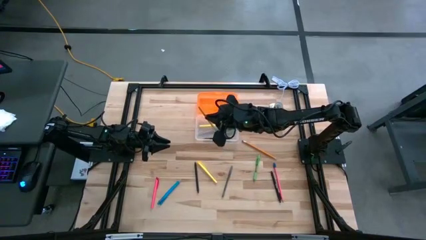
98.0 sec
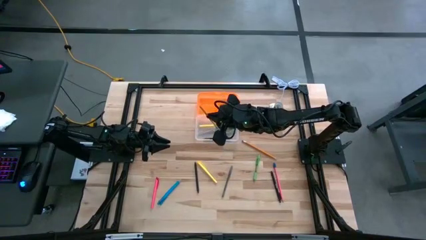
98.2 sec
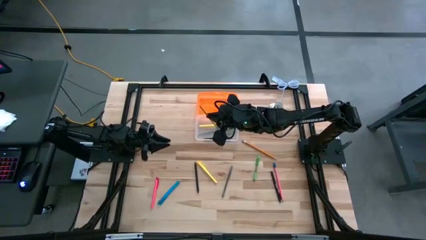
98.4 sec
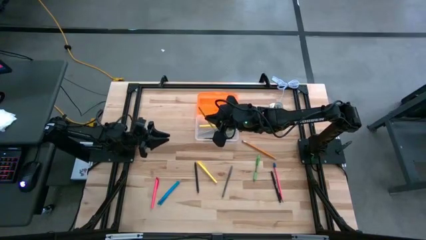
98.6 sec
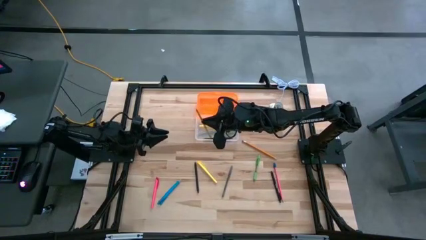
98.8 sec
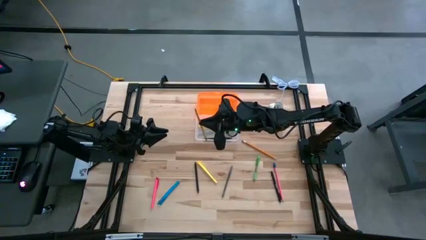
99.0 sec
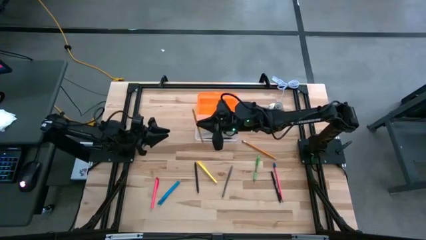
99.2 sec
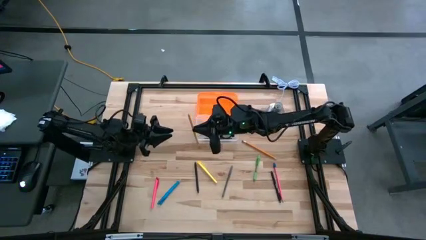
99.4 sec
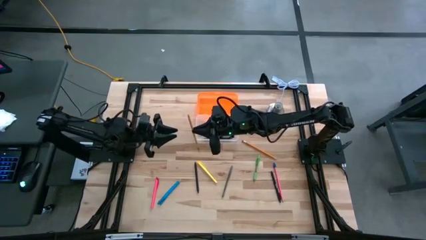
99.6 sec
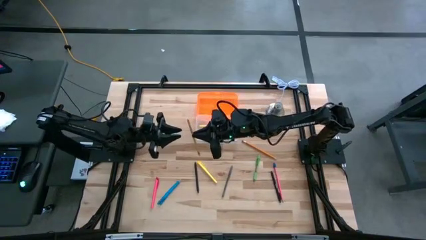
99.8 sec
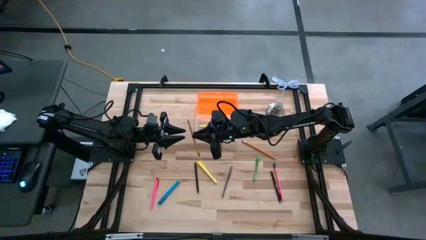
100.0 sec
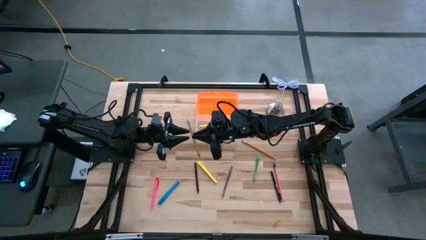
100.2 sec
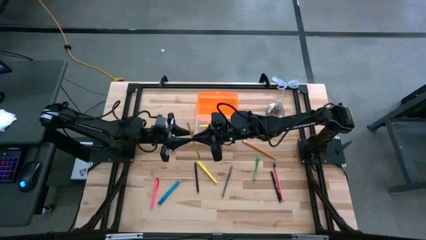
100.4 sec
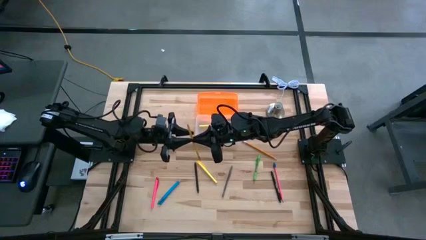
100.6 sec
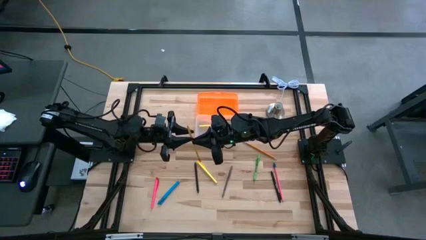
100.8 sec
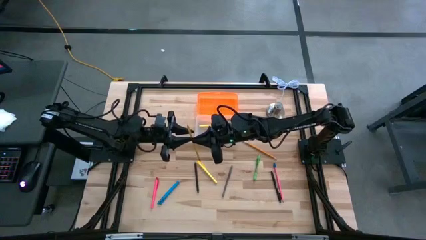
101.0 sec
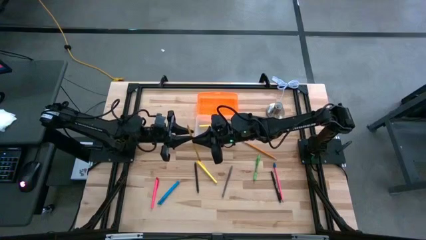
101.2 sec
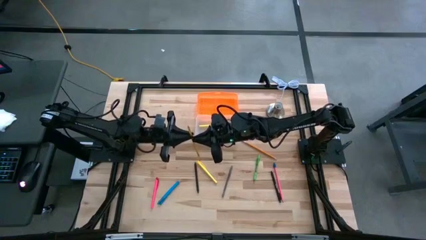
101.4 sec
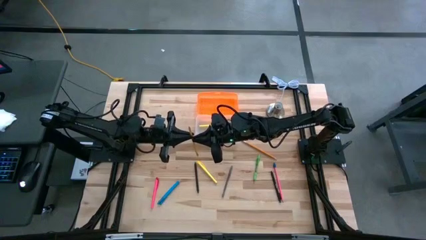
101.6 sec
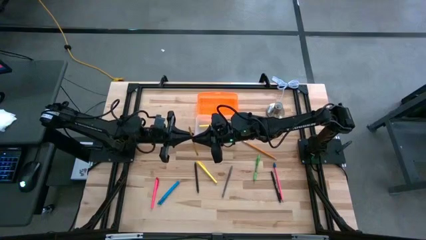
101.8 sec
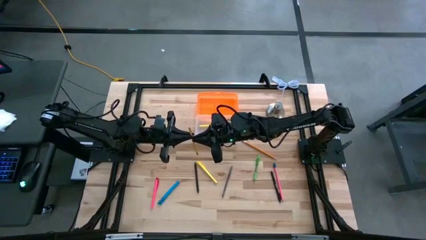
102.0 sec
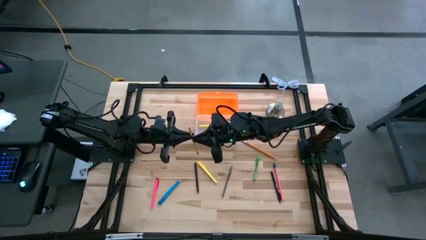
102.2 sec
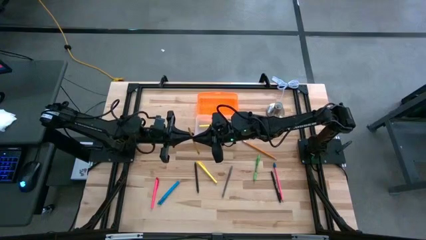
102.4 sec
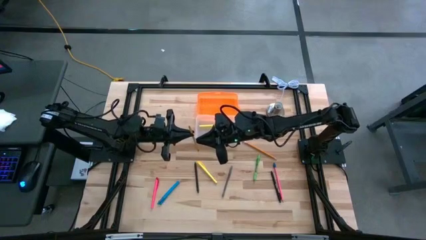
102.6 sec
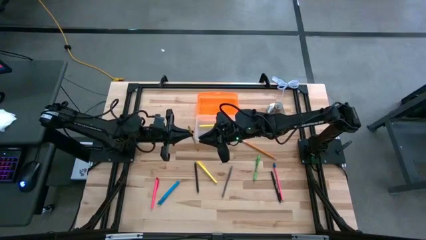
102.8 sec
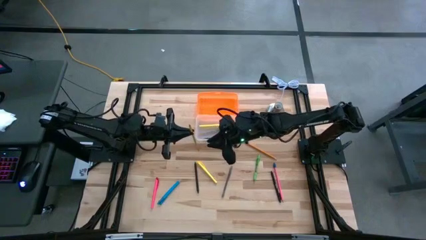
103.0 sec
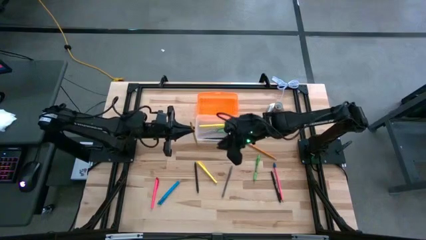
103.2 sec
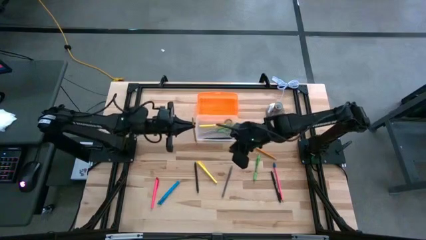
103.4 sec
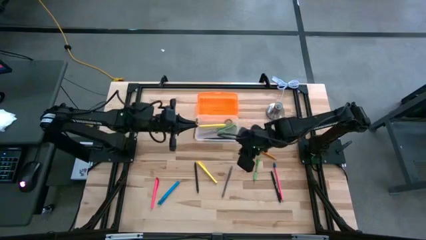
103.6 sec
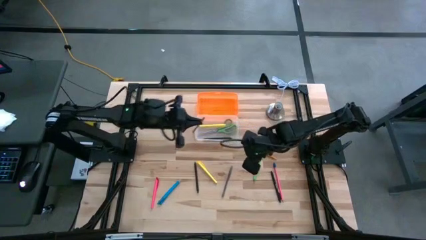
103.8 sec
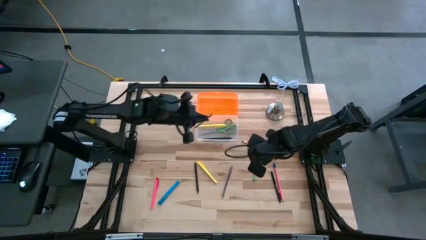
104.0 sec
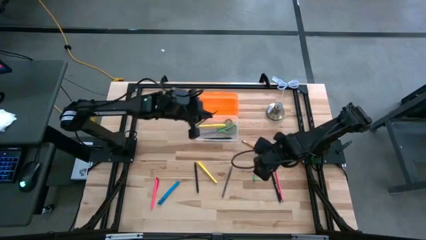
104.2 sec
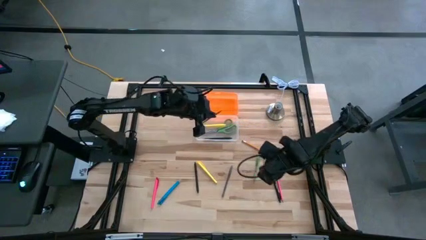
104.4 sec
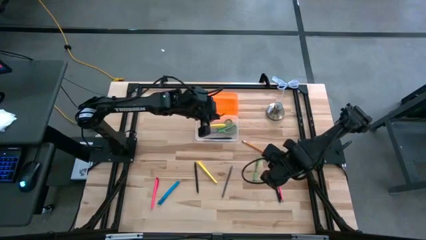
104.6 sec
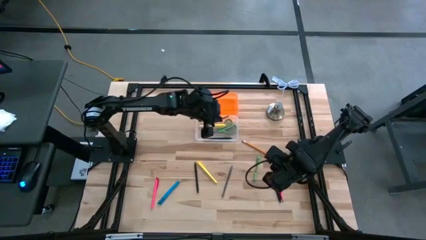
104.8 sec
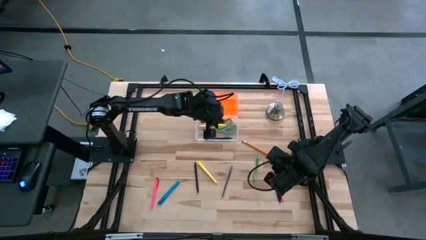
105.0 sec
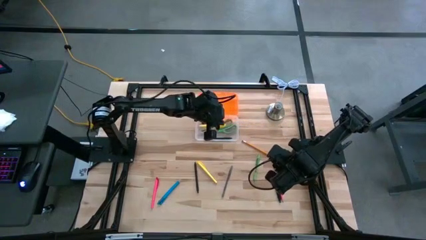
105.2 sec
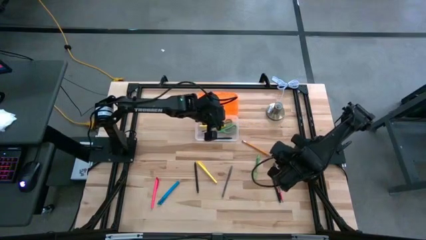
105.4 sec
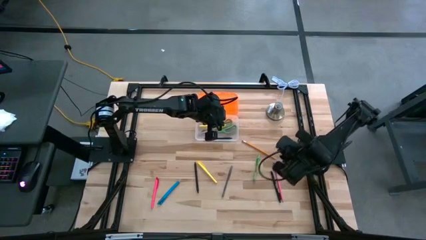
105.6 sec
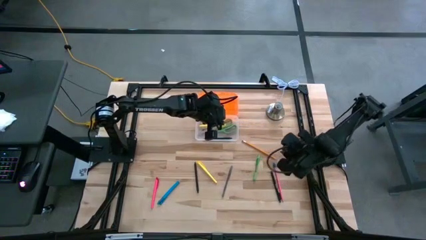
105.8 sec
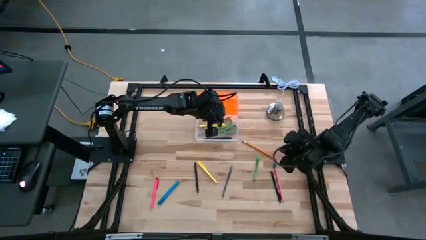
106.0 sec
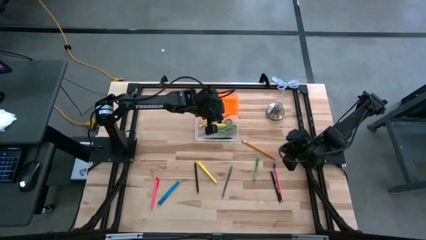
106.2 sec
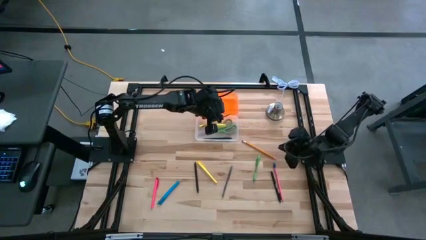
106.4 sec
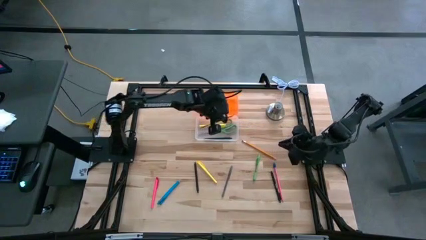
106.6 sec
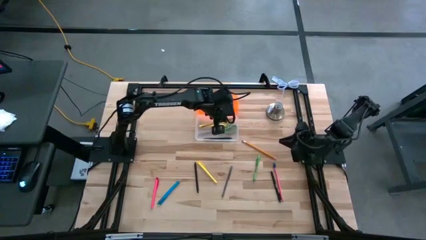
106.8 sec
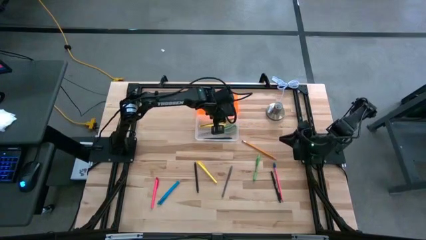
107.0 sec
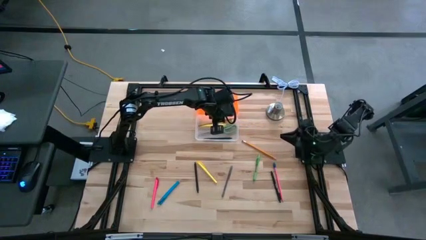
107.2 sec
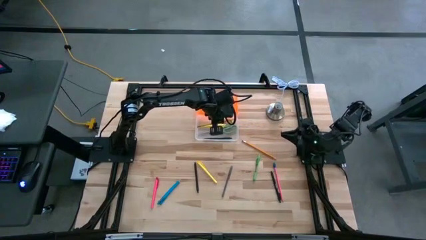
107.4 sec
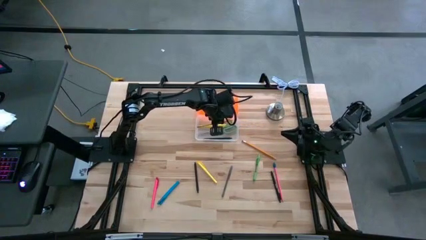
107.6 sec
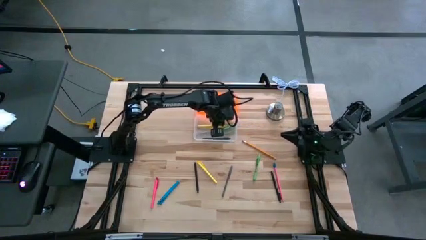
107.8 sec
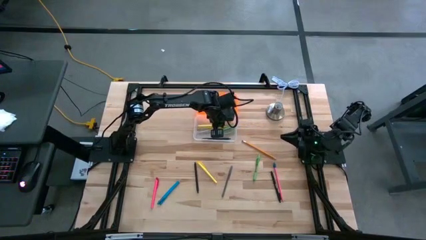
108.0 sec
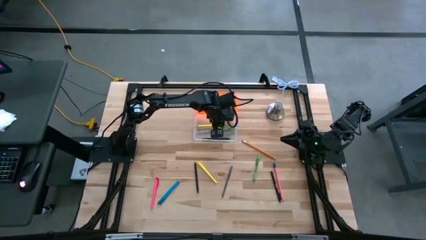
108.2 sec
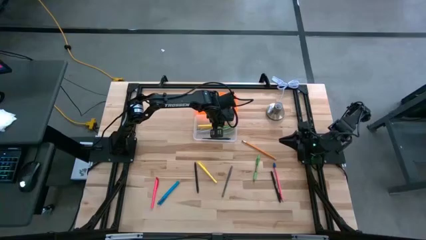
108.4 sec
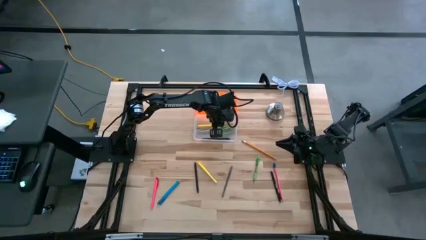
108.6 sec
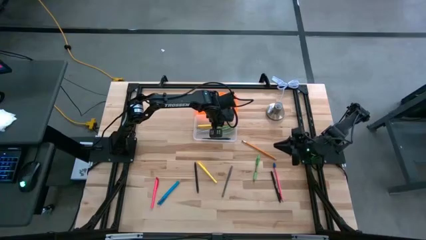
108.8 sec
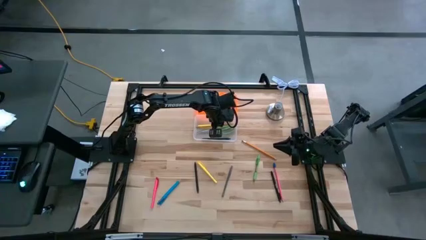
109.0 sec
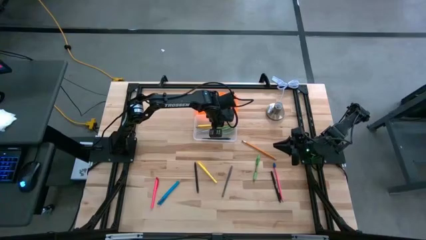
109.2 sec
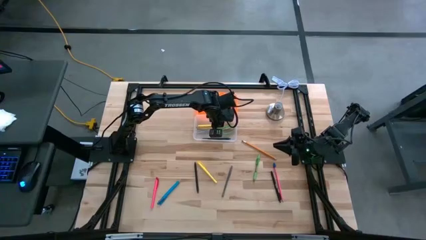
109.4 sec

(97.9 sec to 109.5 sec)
Task: Pick & place school supplies into a supply box
Put the yellow pencil into the orange supply box

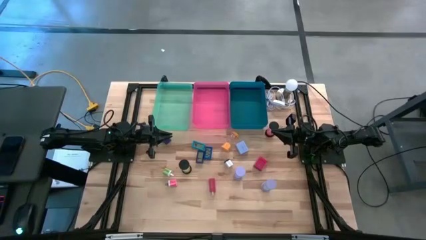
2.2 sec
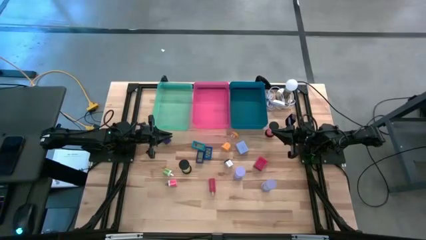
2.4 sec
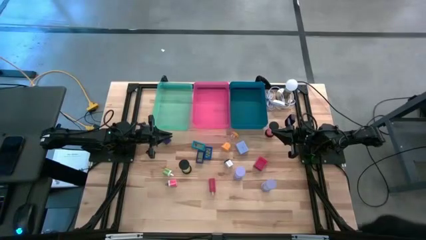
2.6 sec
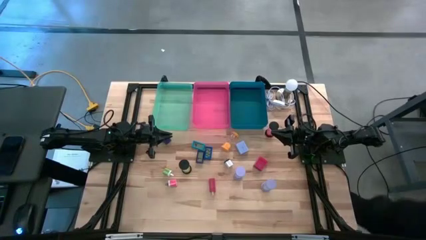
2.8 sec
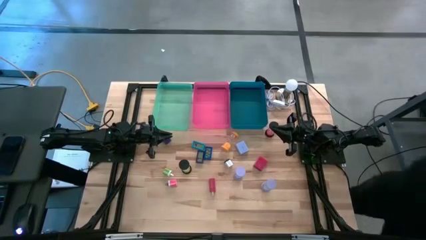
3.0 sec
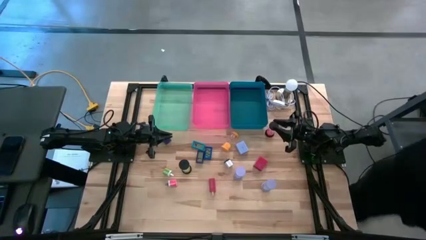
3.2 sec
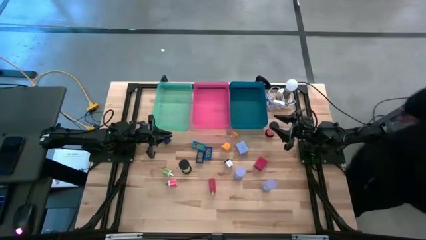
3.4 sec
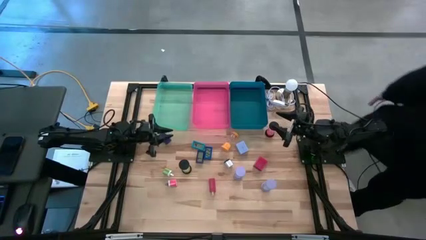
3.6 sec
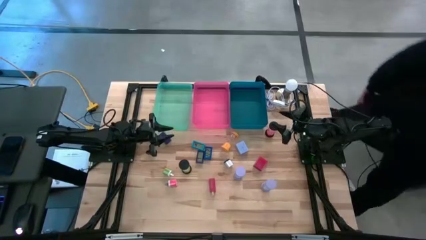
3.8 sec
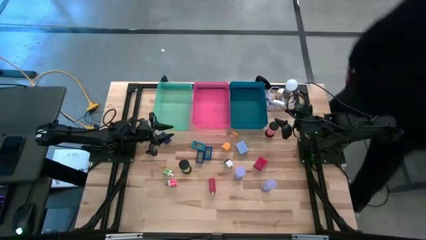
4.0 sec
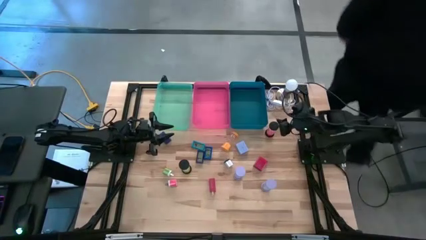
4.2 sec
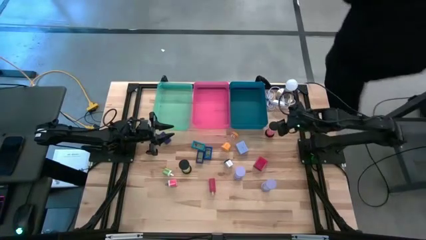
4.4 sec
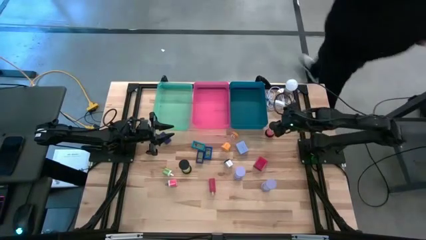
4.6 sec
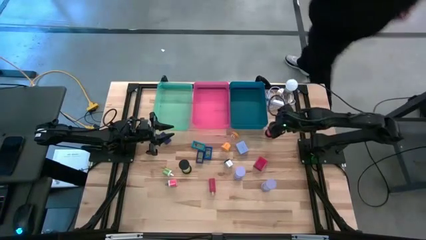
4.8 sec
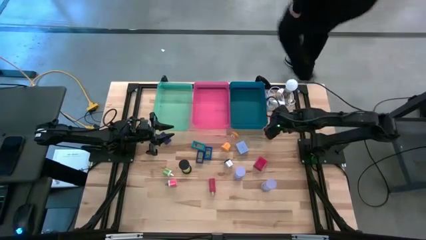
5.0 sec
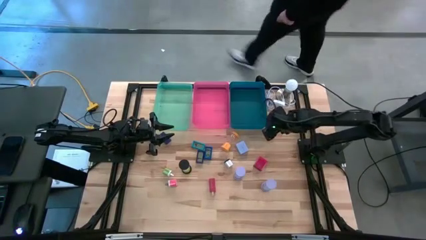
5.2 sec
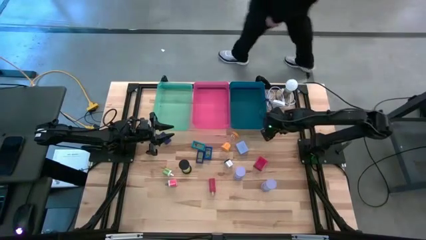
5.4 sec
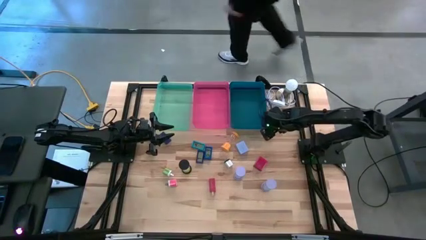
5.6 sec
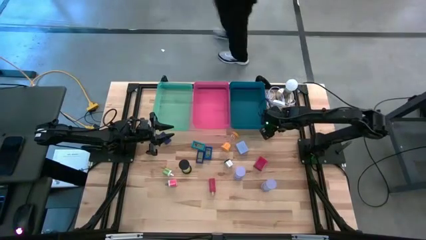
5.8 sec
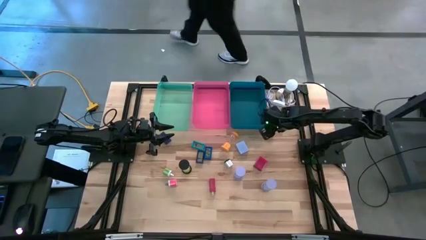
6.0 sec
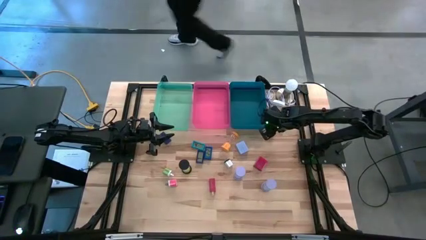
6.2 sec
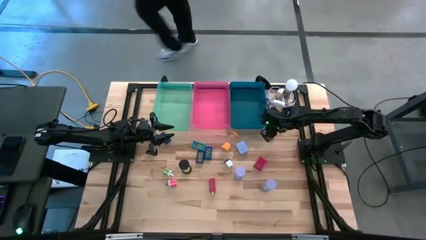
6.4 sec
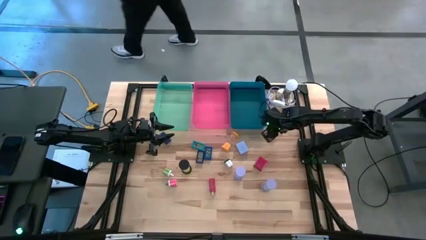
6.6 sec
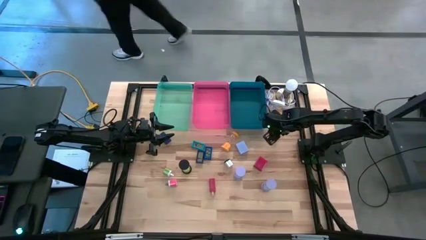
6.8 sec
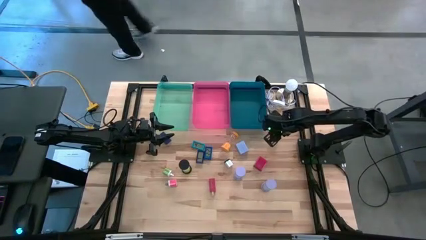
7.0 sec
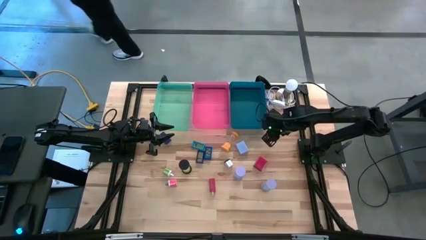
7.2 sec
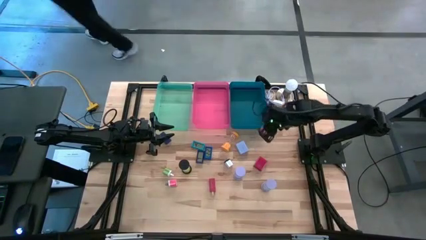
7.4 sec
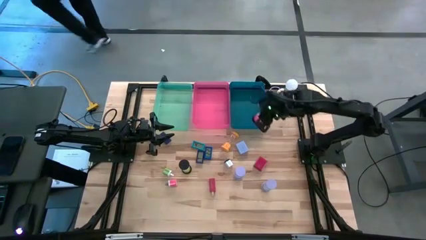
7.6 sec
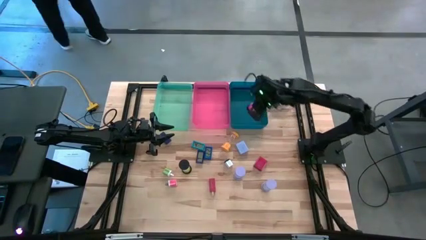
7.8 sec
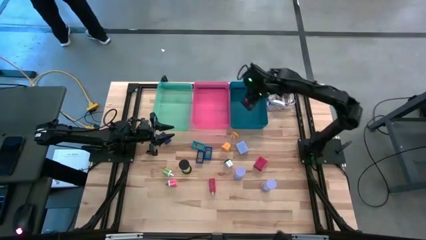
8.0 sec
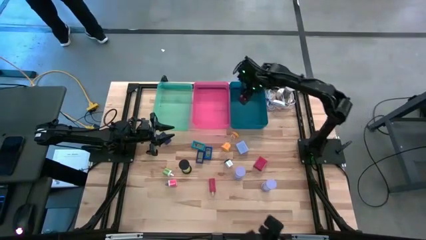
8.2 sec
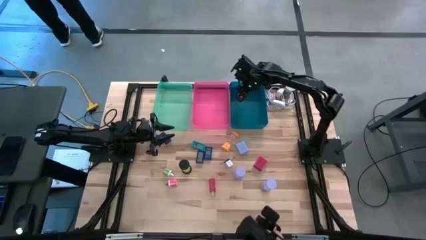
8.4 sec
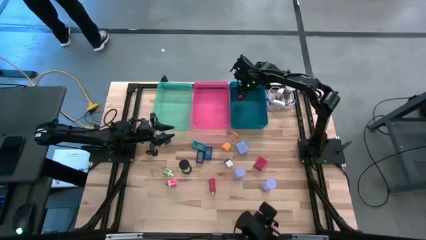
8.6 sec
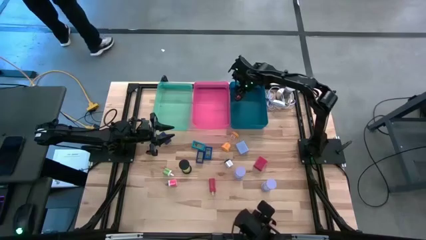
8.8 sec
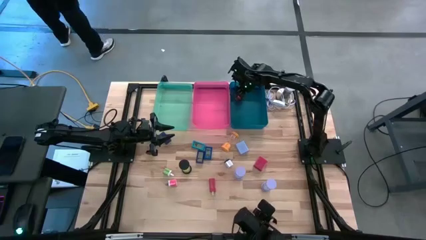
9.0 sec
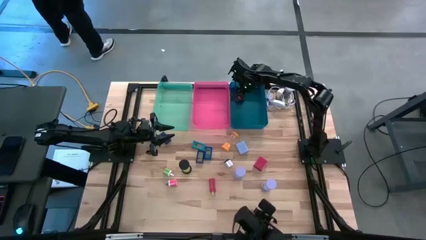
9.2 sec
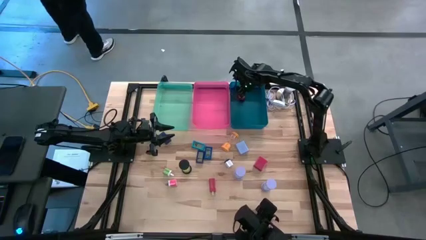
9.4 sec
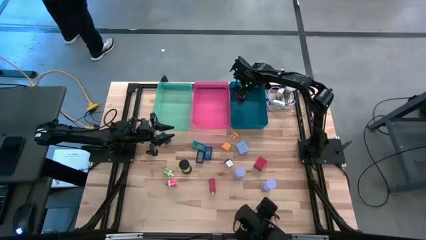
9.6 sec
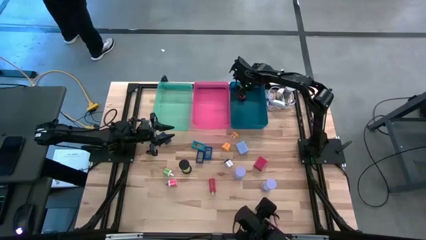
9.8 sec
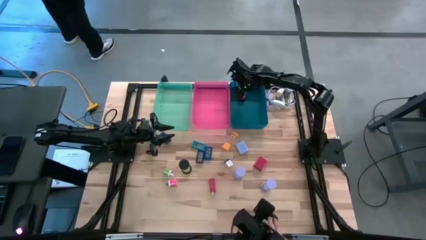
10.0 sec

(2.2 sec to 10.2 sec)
Task: Pick & Place Office items
Put the pink hourglass into the blue bin
